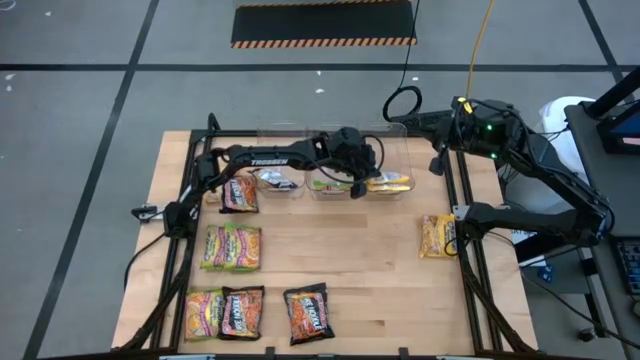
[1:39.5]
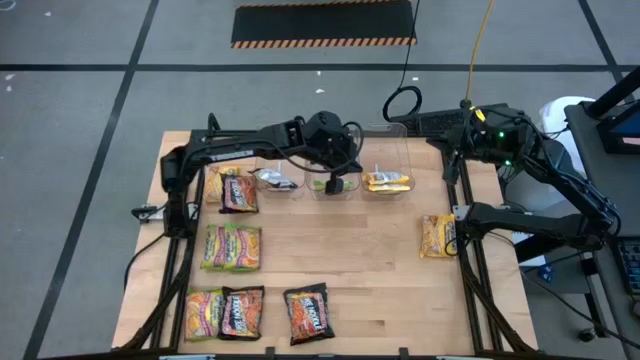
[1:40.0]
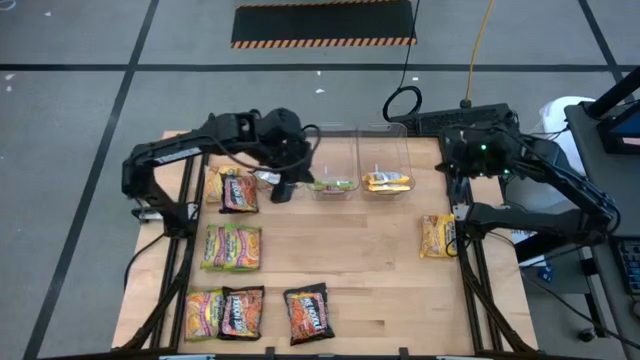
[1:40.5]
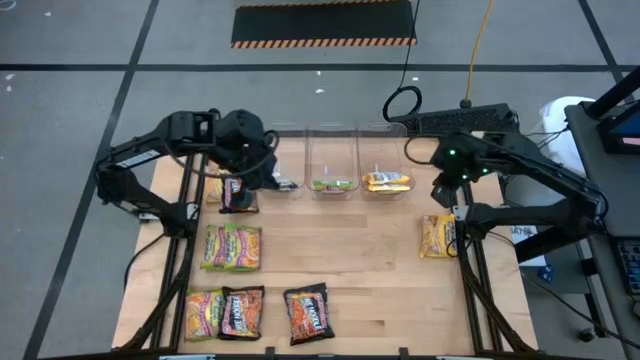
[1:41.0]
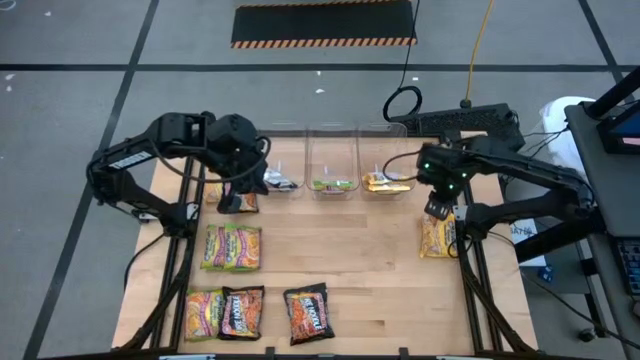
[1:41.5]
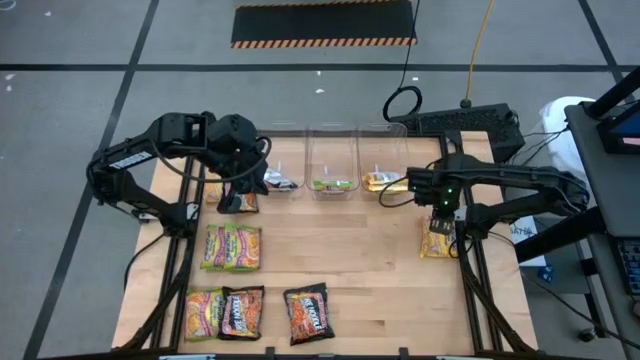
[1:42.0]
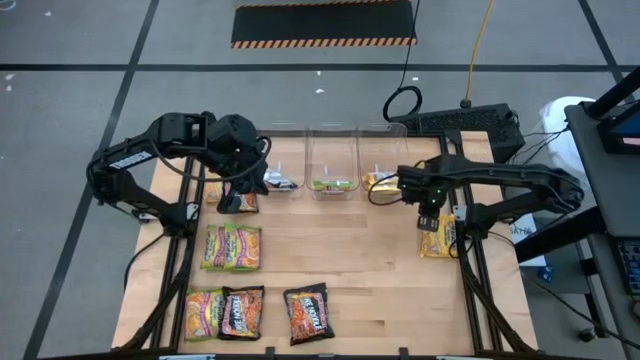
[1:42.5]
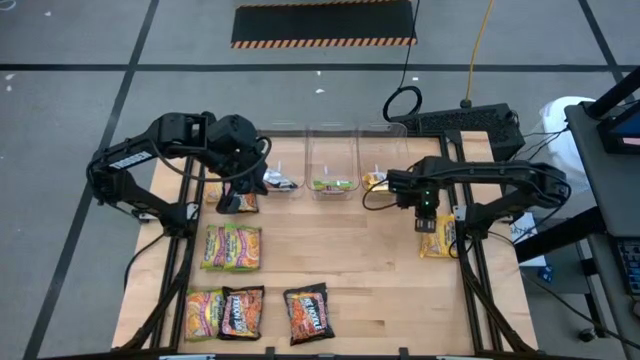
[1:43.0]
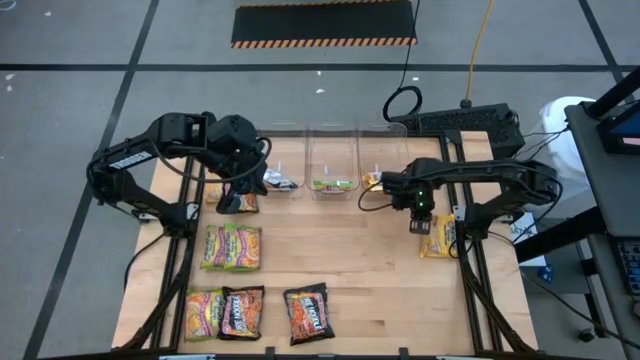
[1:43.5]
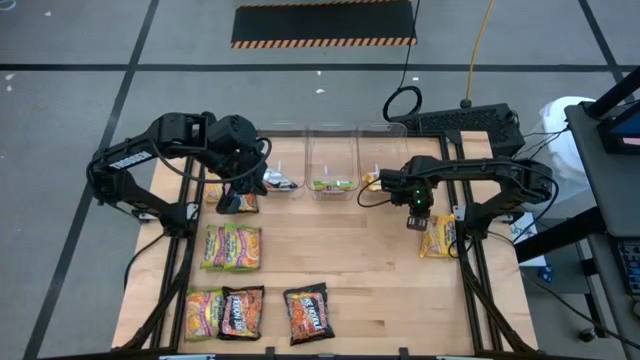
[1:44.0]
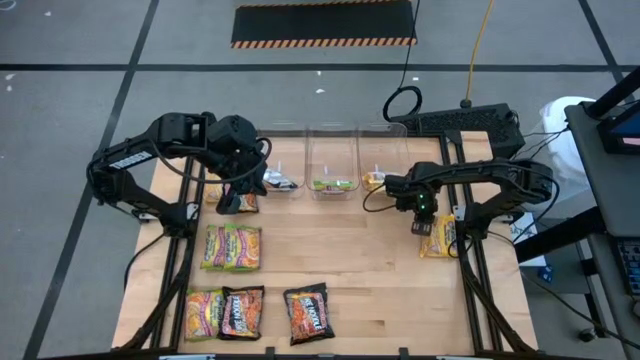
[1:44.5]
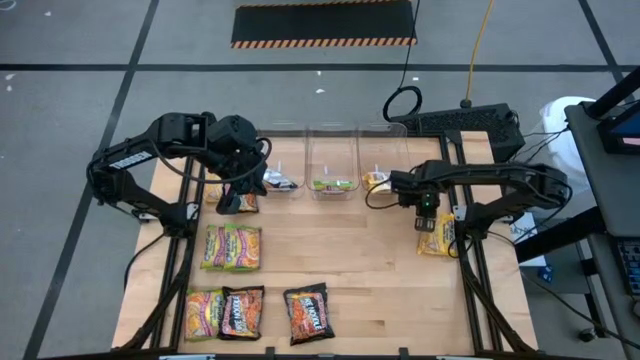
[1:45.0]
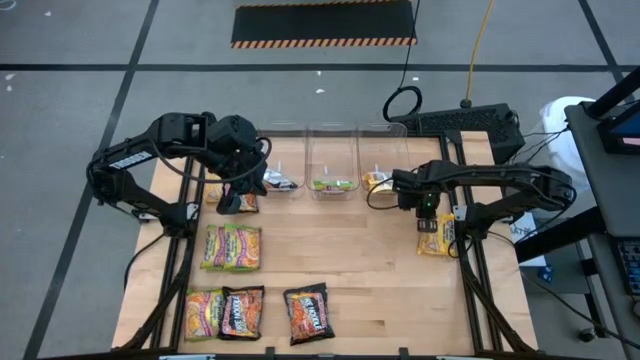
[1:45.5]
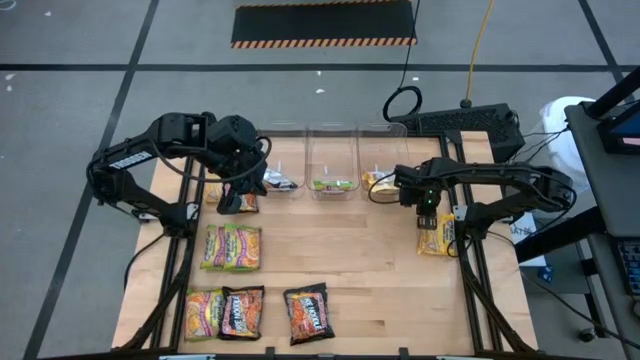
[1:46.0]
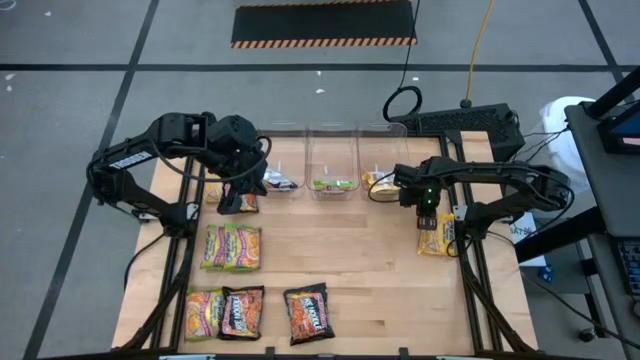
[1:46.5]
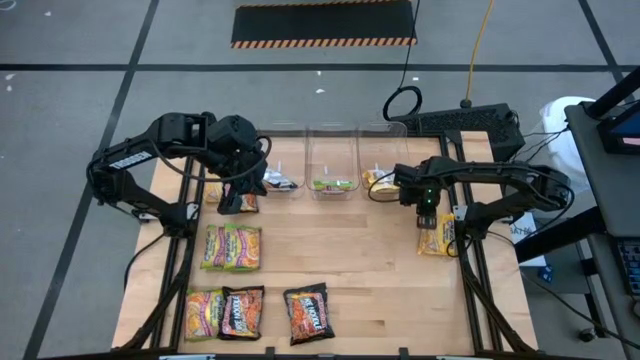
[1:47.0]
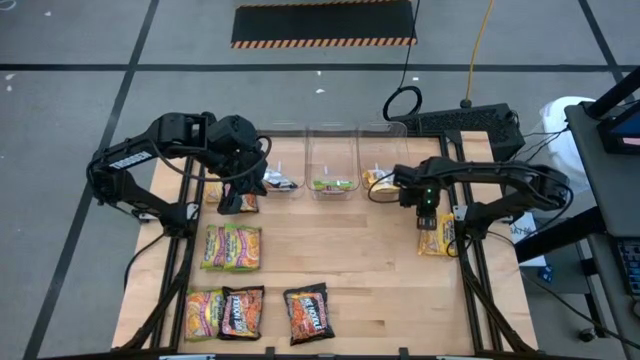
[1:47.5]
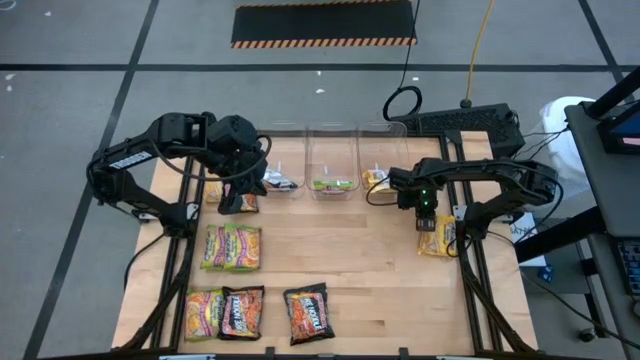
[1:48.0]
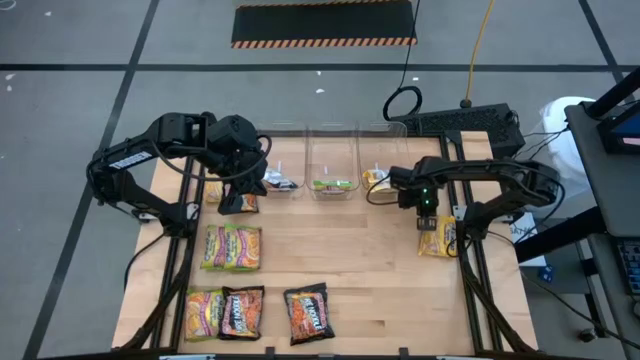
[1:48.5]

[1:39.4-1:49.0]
Task: Sort Maruchan noodles
Put the yellow noodle pack into the right transparent bin

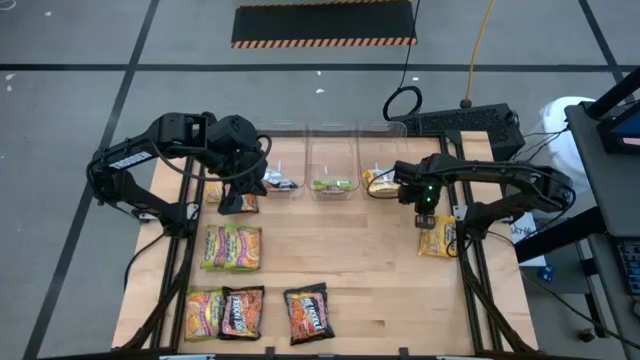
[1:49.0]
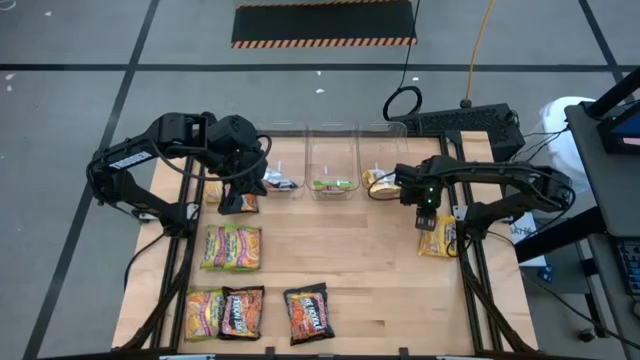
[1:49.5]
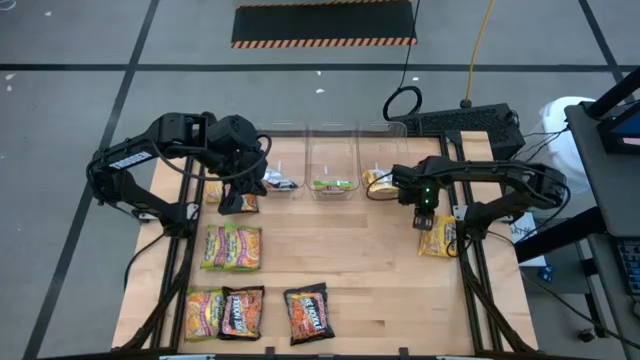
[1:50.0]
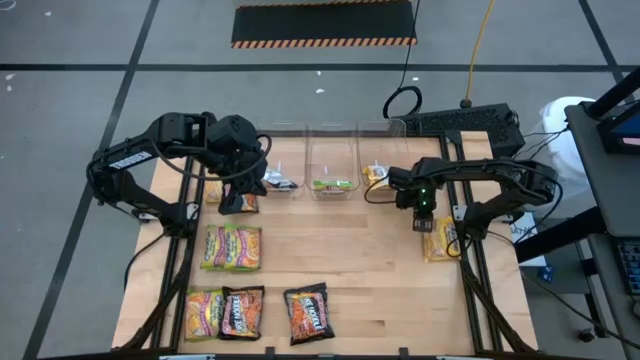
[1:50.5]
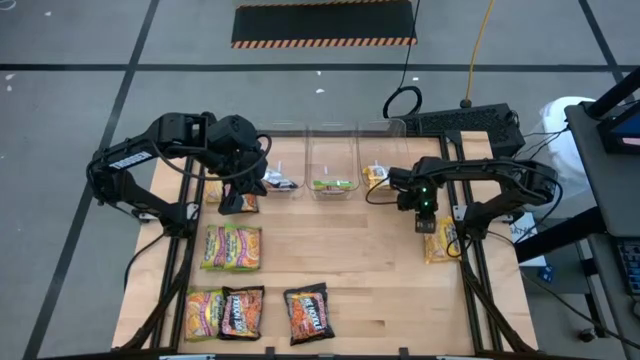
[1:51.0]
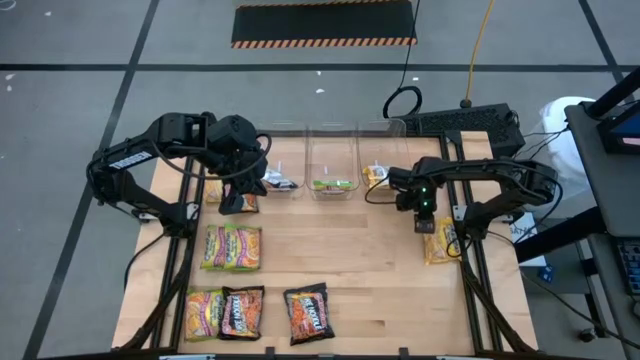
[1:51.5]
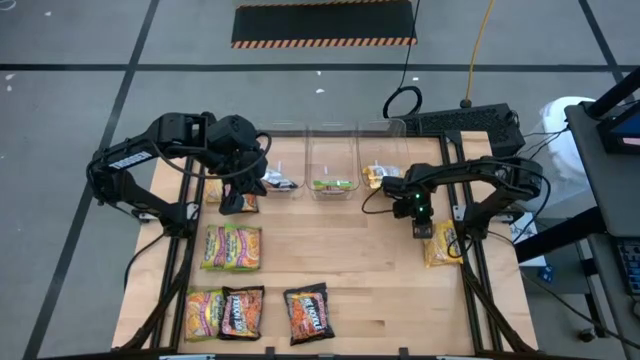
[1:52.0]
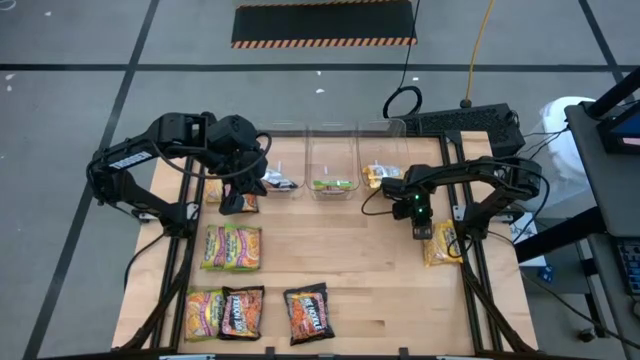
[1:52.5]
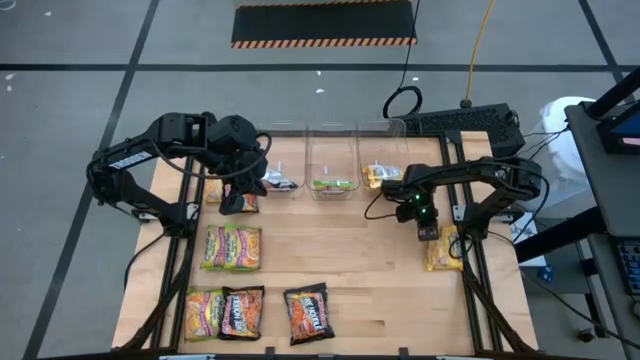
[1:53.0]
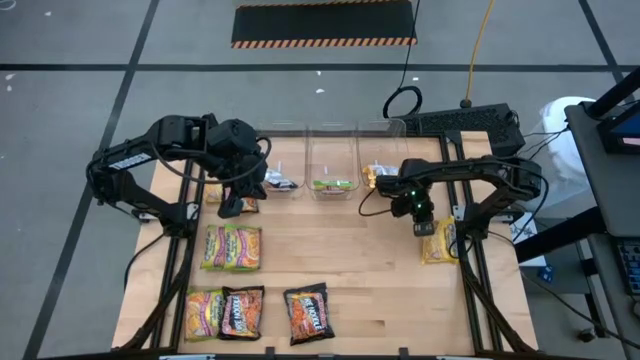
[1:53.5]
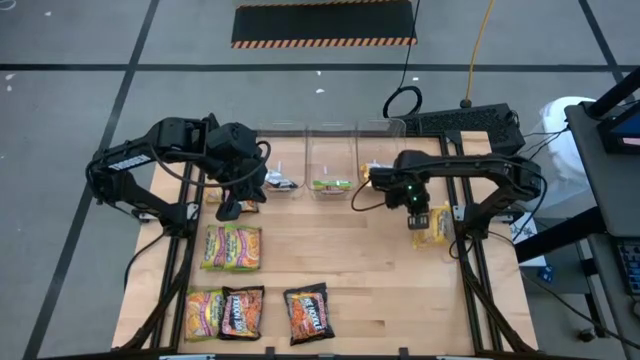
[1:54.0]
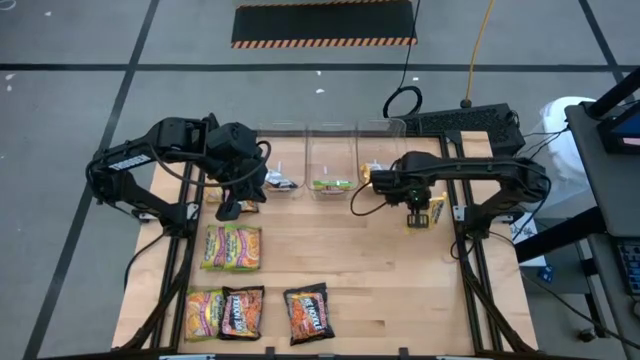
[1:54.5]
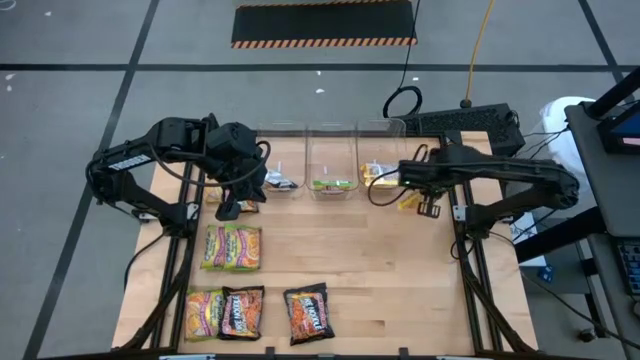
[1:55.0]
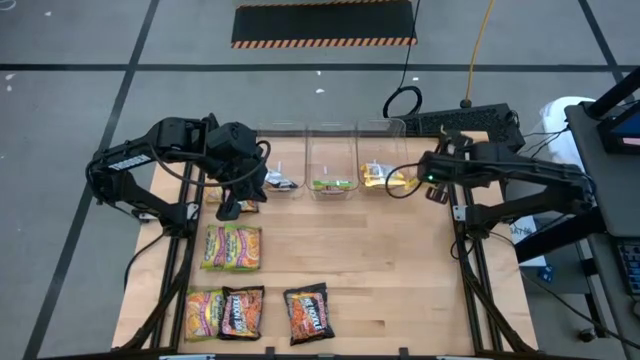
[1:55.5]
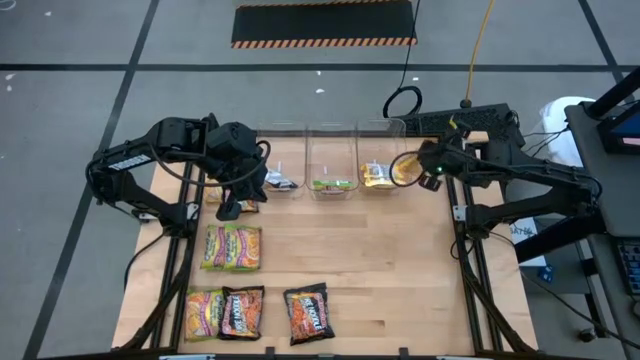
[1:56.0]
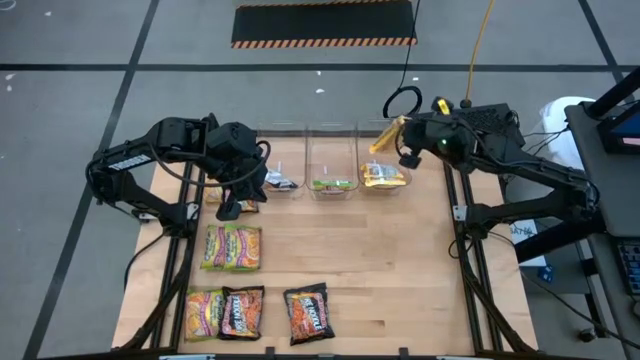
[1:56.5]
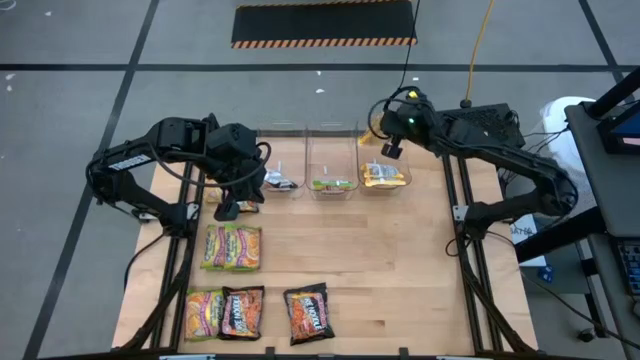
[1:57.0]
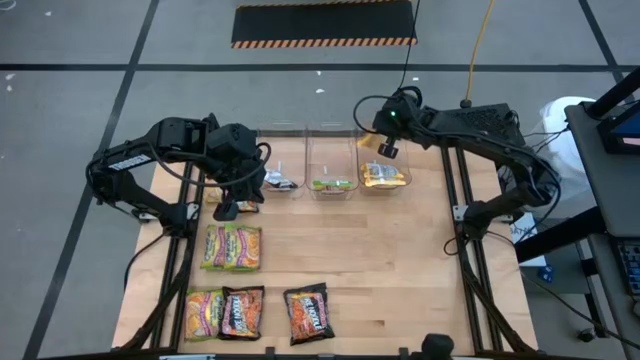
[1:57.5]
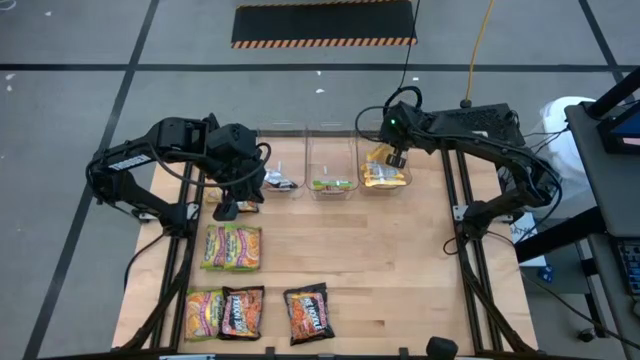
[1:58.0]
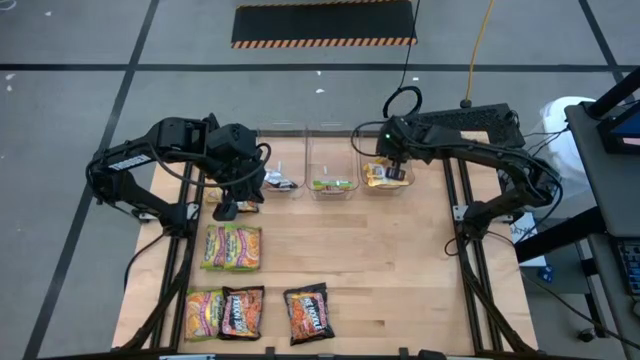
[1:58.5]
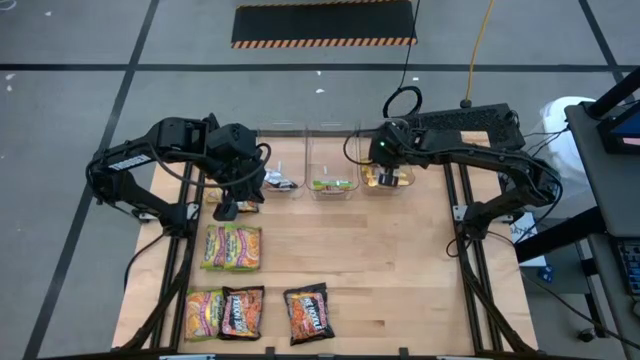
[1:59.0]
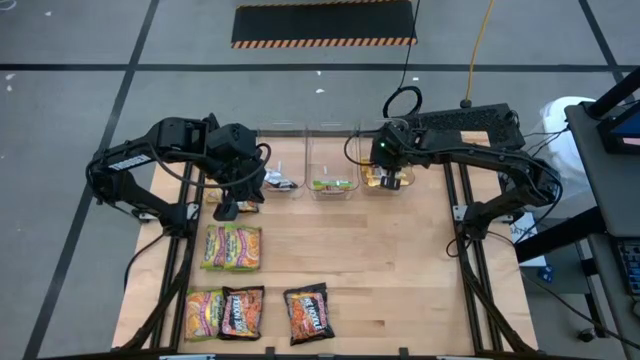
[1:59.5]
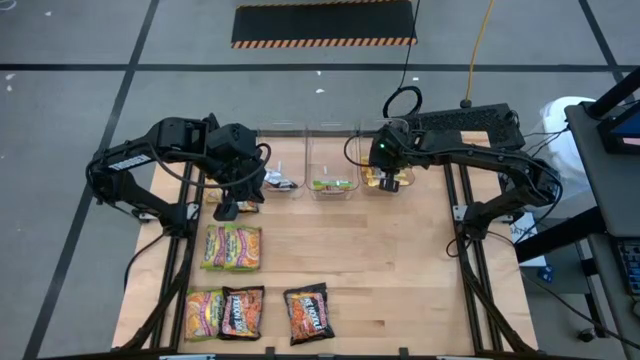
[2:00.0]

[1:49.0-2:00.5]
Put the yellow noodle pack into the right transparent bin
